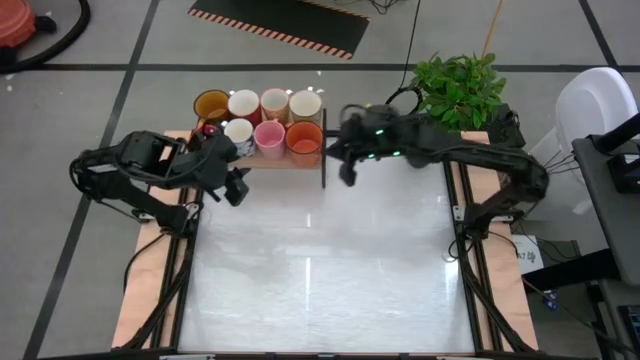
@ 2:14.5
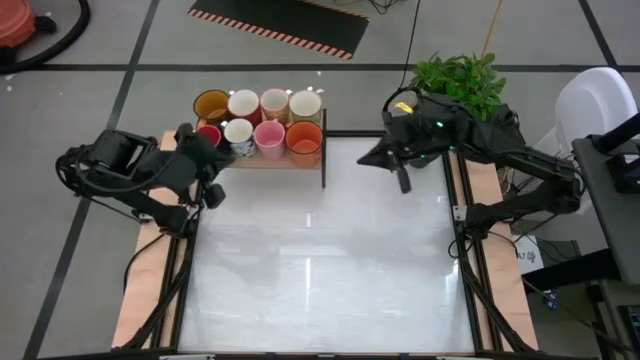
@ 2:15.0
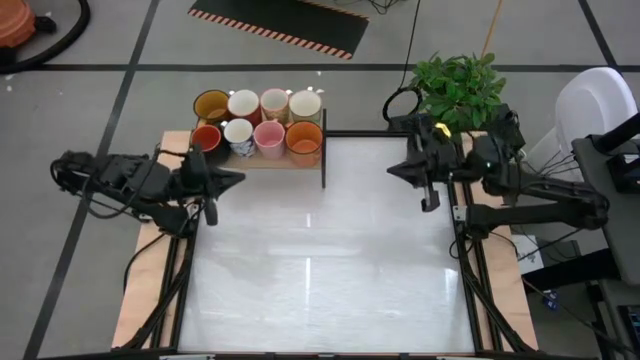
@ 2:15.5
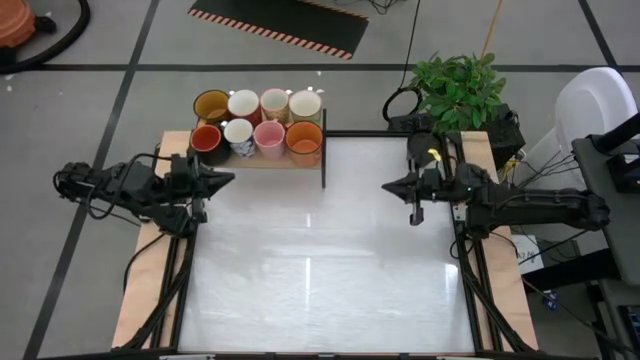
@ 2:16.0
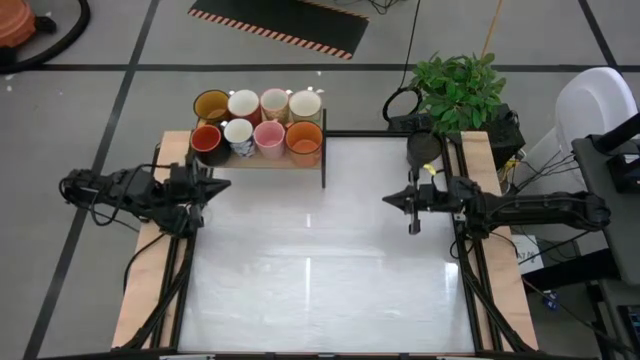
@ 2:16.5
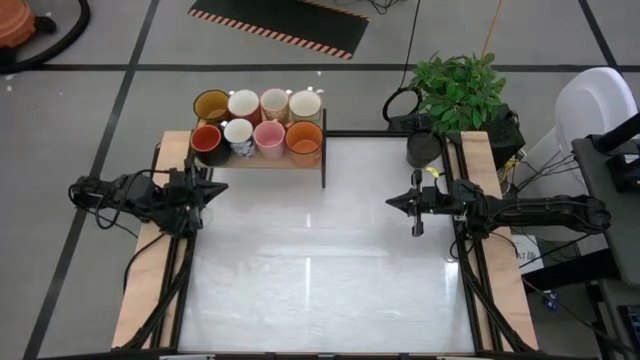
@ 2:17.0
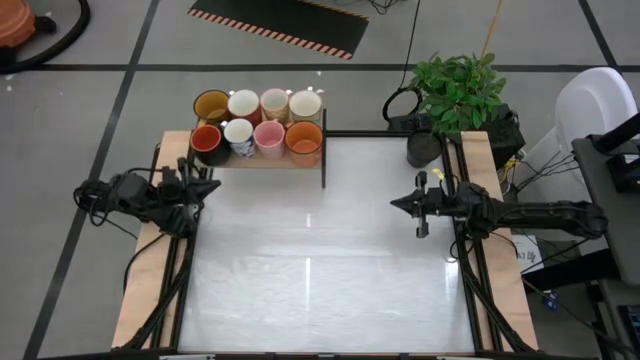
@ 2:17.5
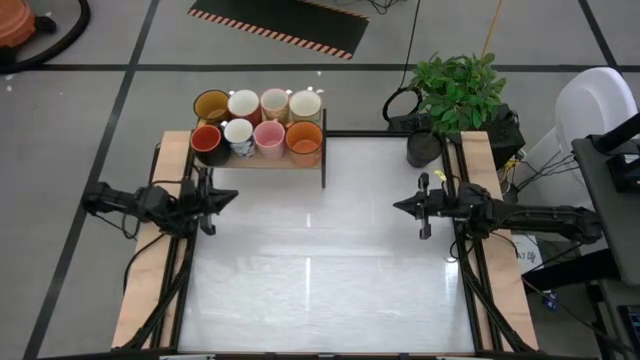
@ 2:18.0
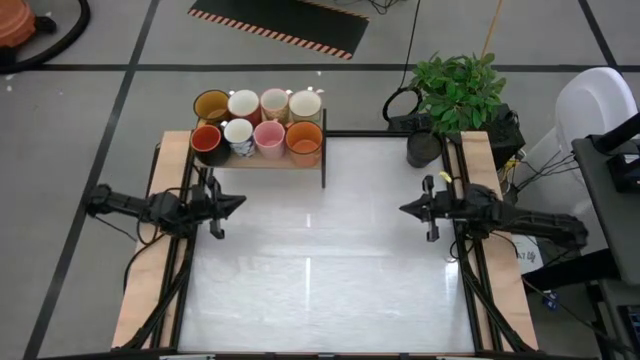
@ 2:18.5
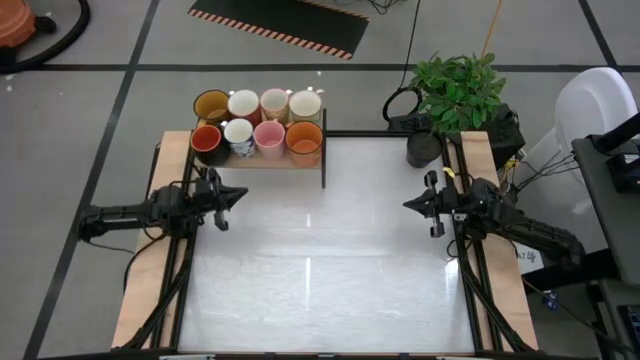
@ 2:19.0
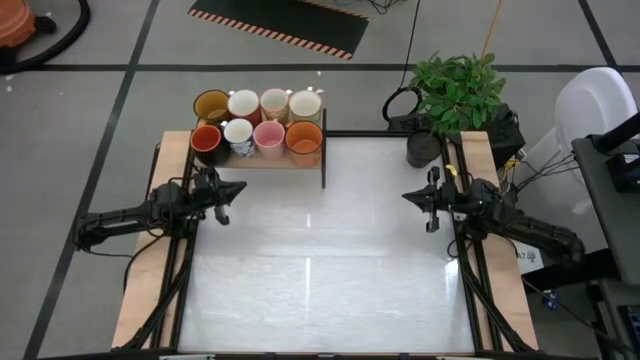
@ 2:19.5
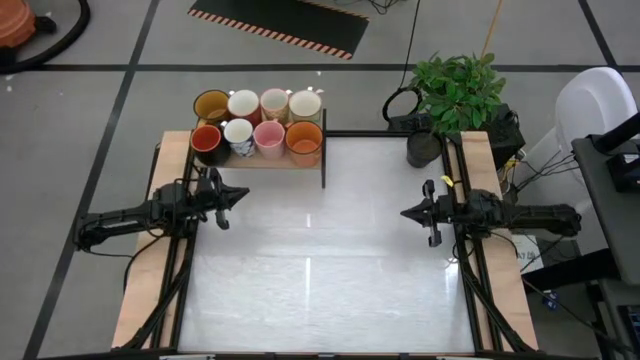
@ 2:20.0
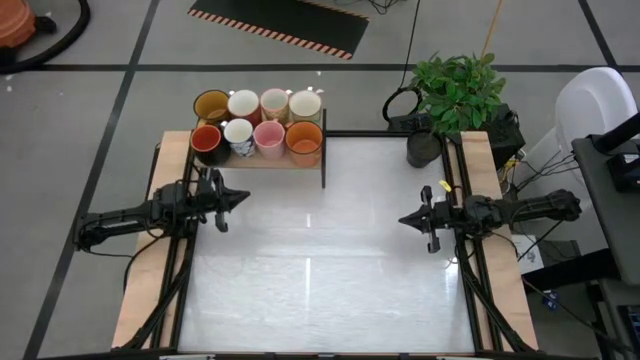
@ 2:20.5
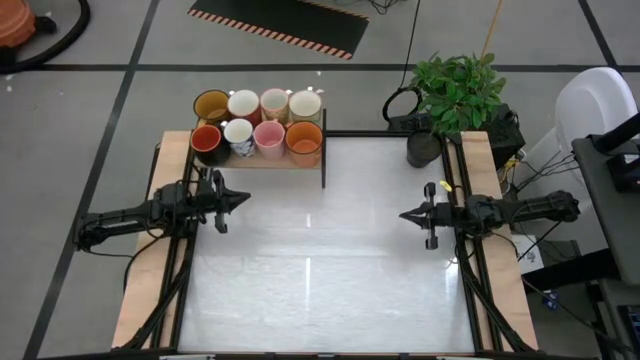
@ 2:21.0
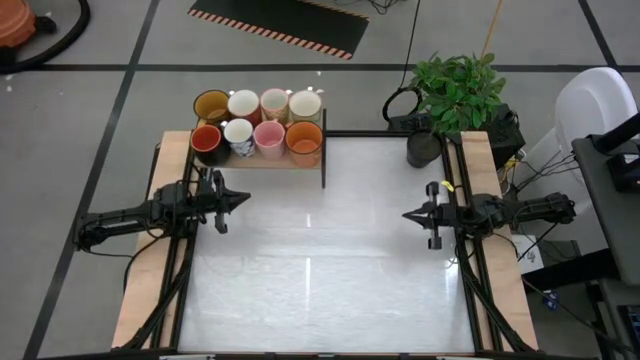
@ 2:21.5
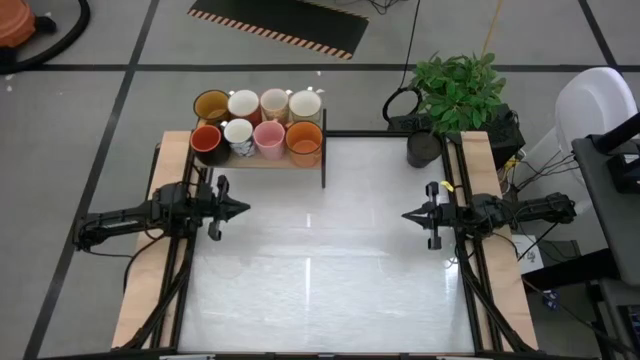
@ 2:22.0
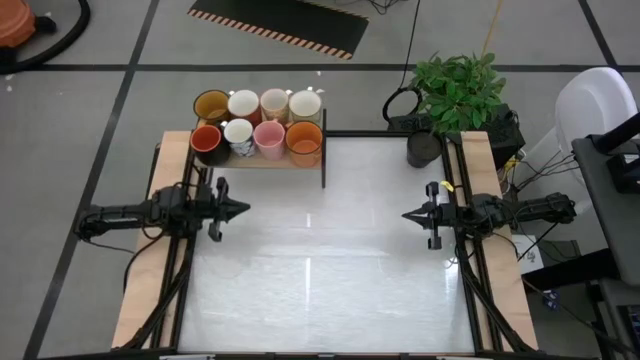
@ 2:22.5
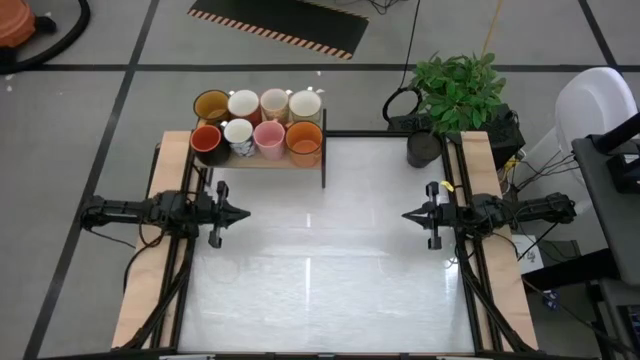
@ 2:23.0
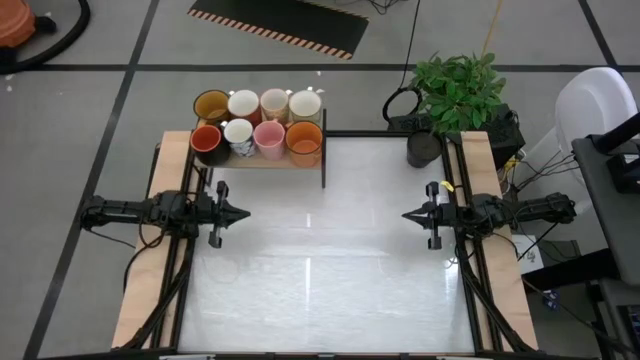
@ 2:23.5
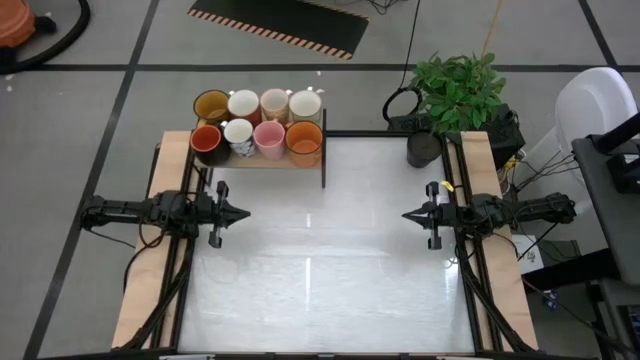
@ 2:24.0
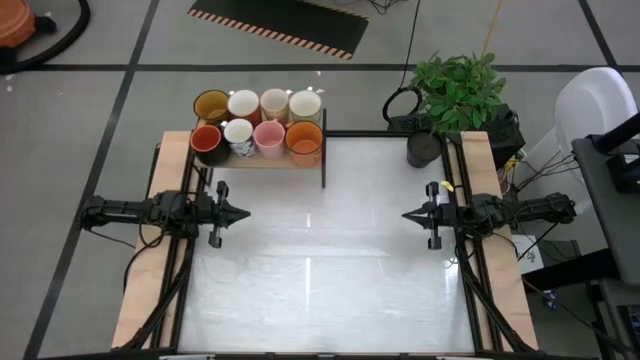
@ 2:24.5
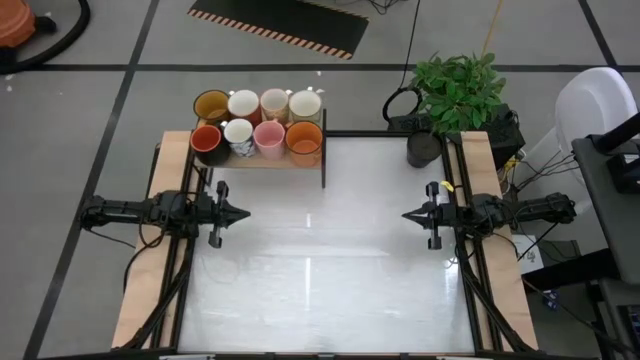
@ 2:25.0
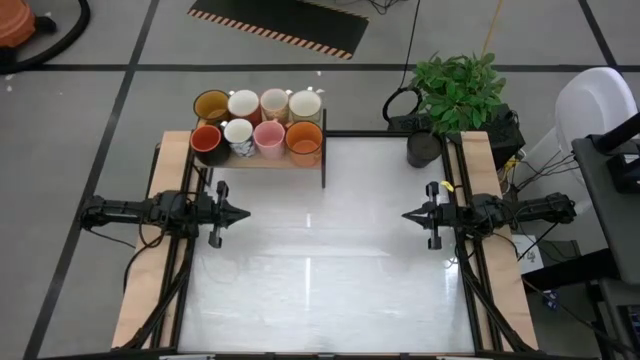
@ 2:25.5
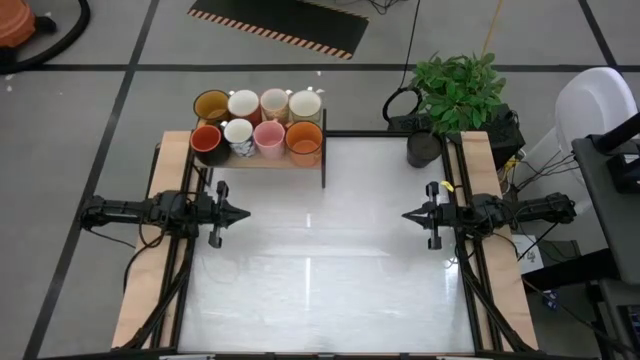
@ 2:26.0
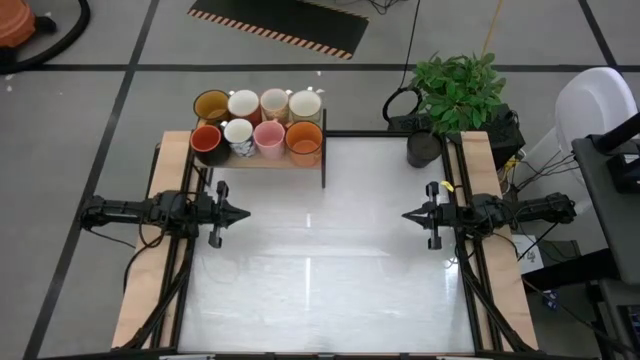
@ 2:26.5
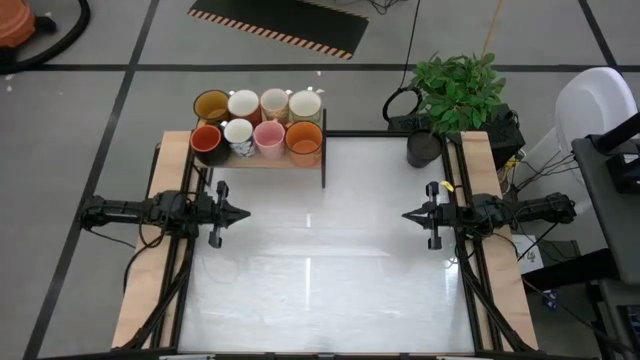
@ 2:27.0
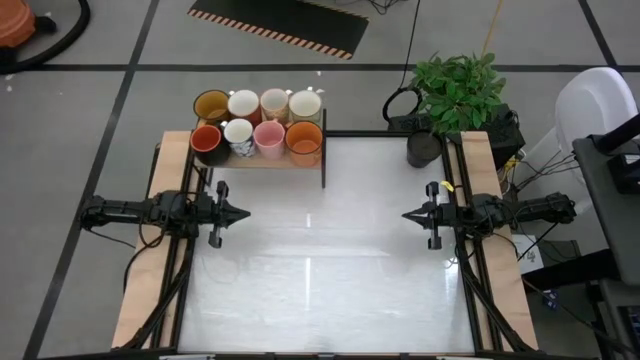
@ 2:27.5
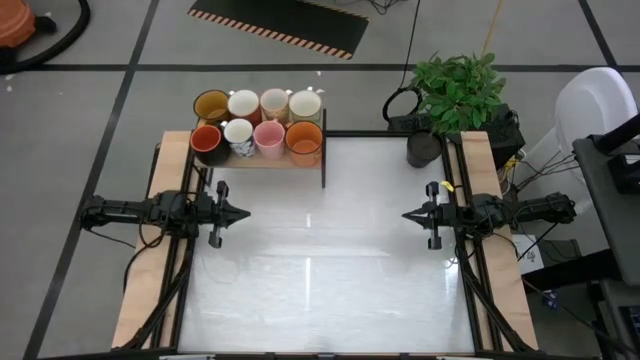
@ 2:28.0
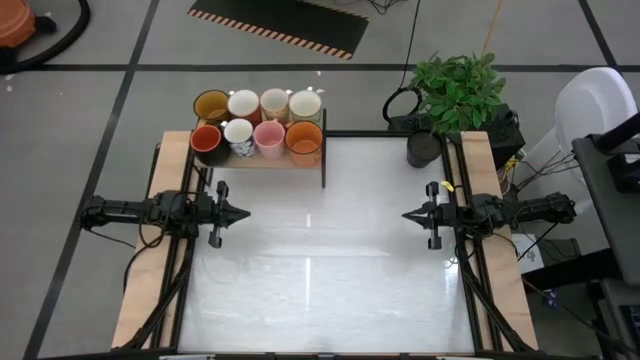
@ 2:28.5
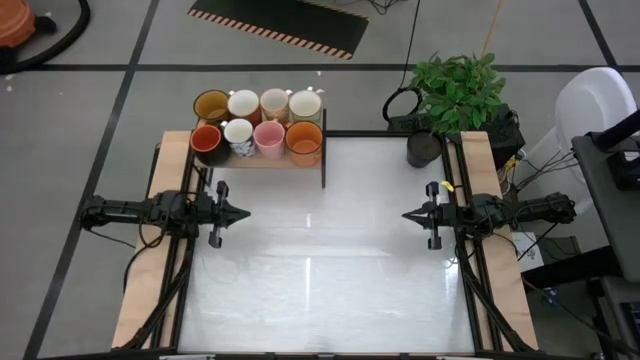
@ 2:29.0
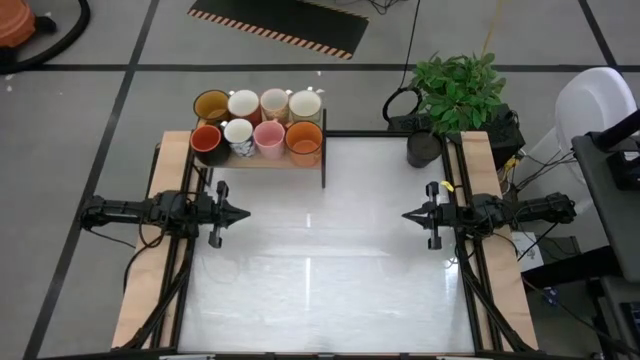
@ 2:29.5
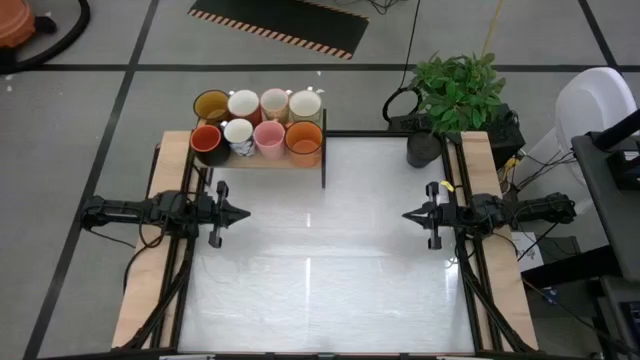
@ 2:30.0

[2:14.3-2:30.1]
Task: Place coffee mugs
Return to Home Position

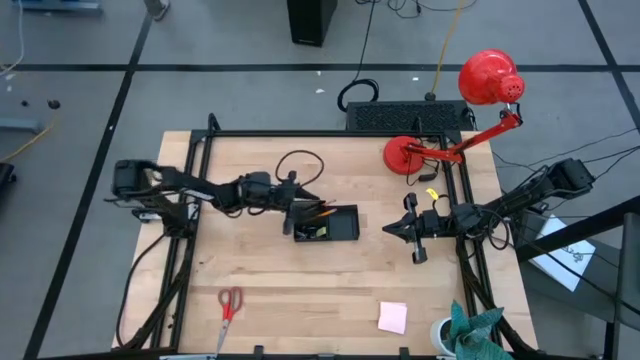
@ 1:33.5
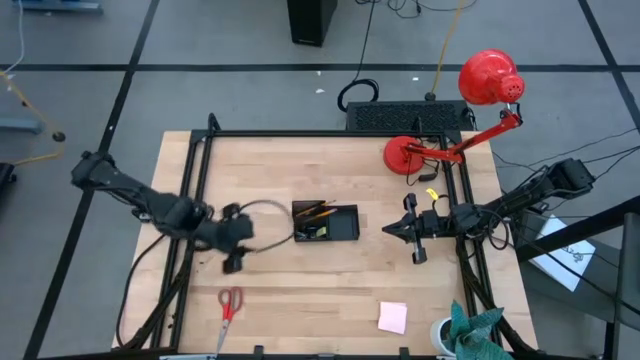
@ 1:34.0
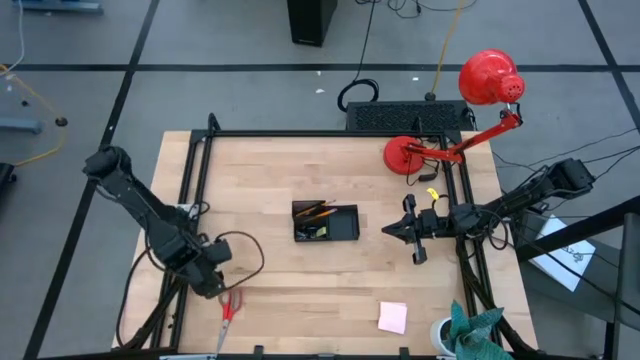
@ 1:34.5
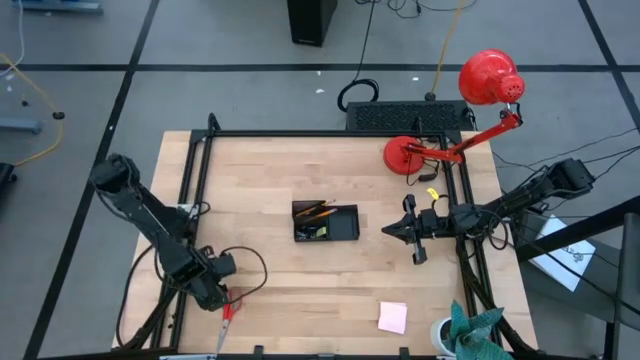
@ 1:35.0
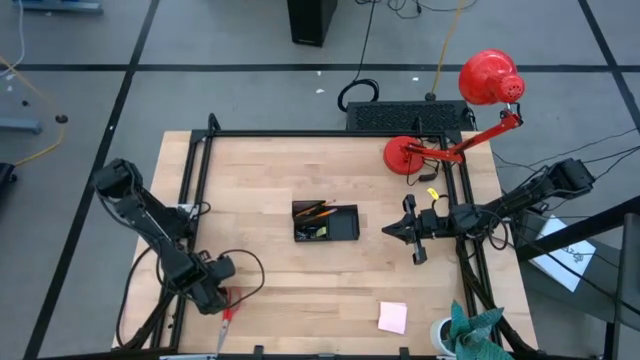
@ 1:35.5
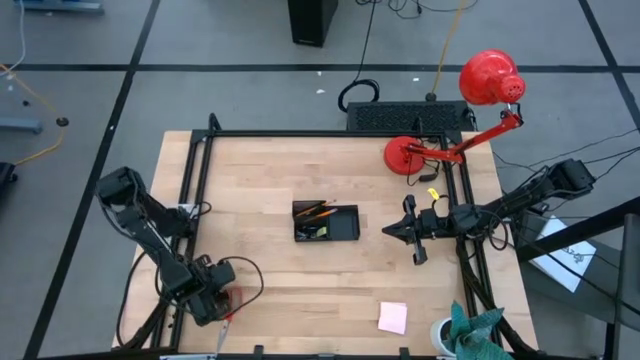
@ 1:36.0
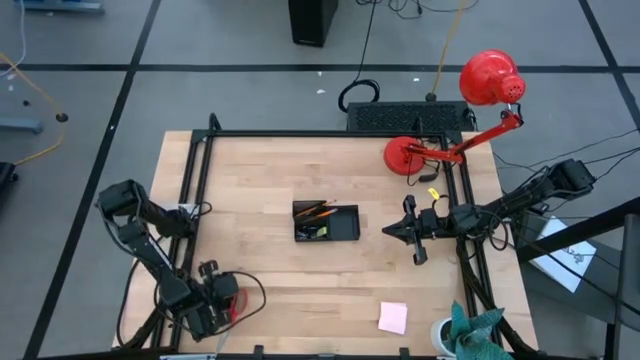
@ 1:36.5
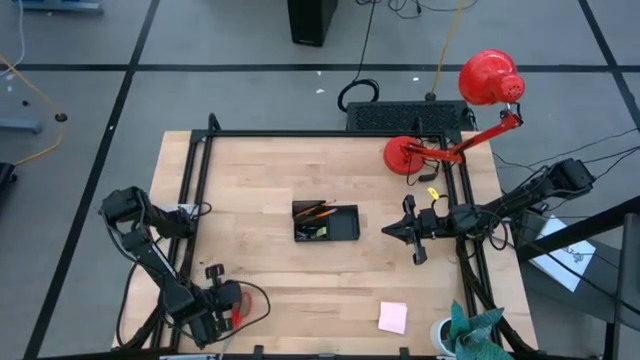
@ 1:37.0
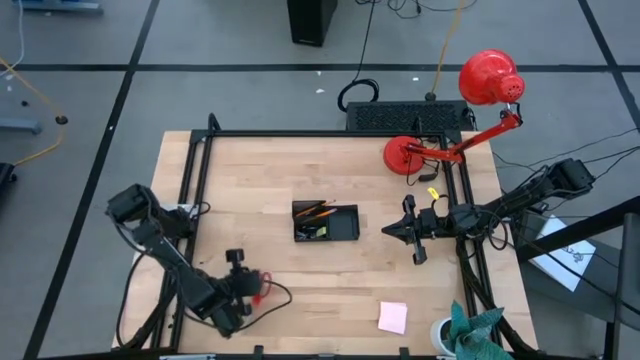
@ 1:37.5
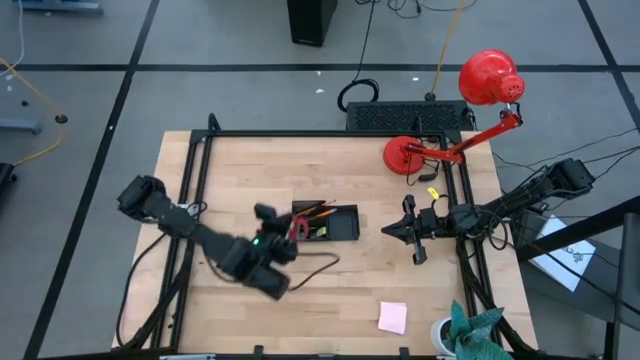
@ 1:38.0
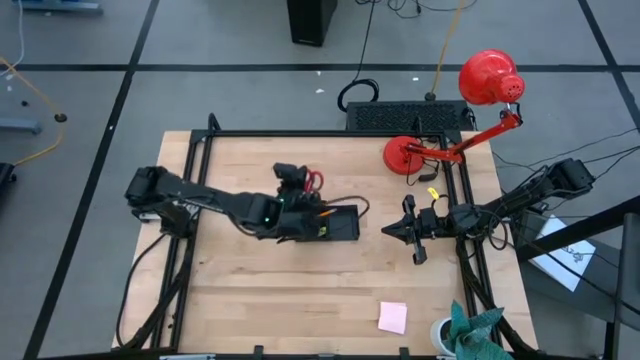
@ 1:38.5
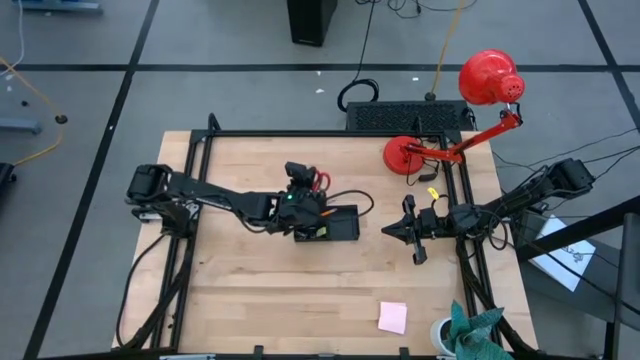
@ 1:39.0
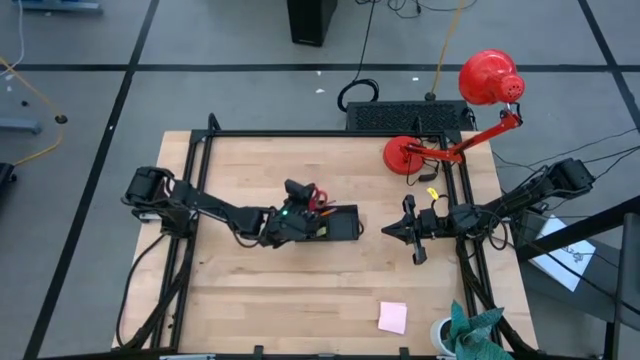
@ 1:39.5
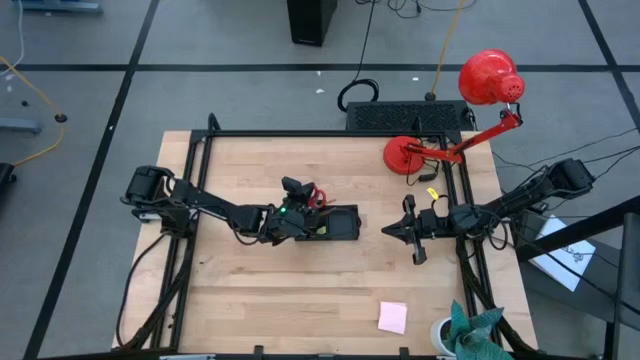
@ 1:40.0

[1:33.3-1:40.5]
Task: Pick and place office supplies into organizer
Put the red scissors into the desk organizer
